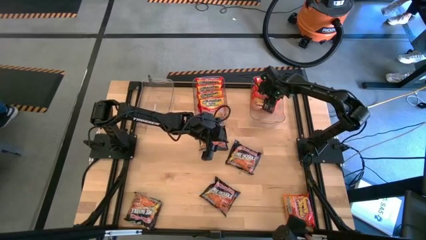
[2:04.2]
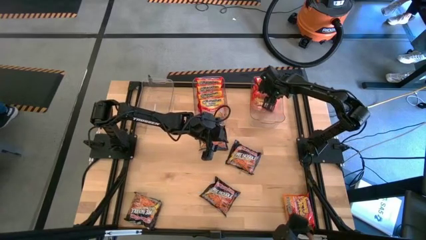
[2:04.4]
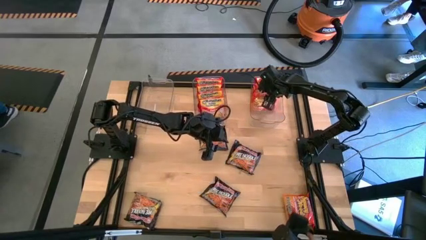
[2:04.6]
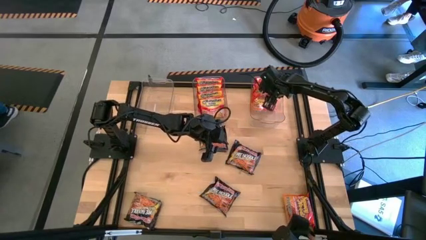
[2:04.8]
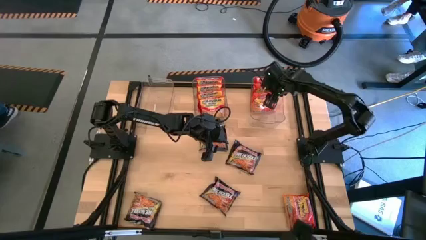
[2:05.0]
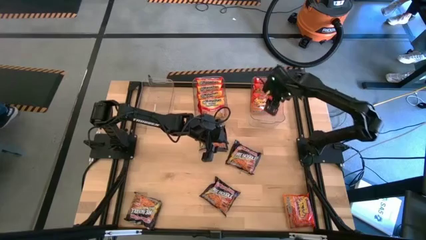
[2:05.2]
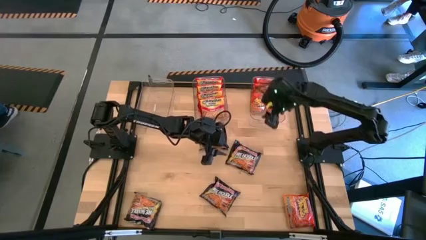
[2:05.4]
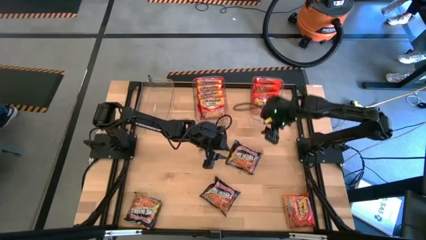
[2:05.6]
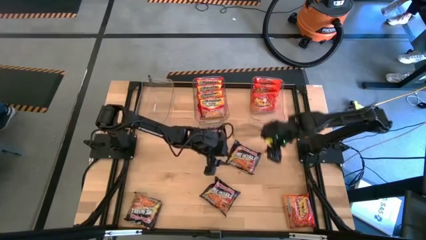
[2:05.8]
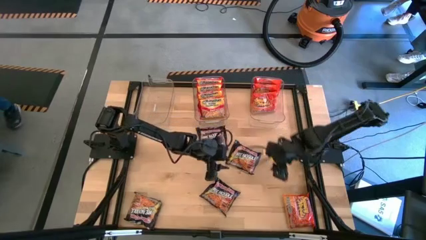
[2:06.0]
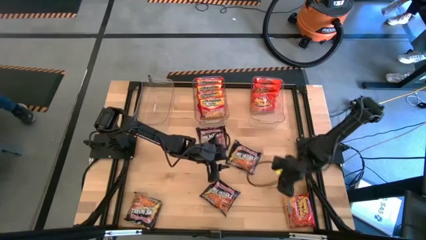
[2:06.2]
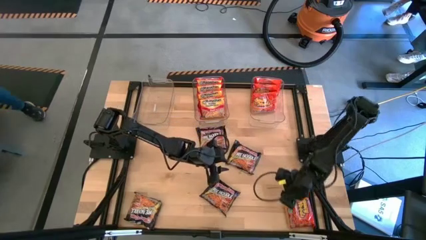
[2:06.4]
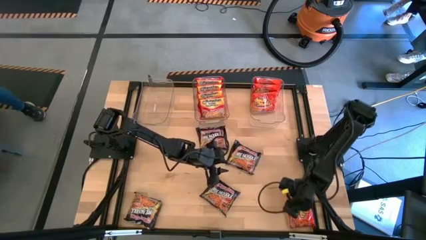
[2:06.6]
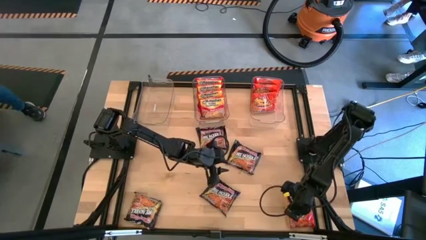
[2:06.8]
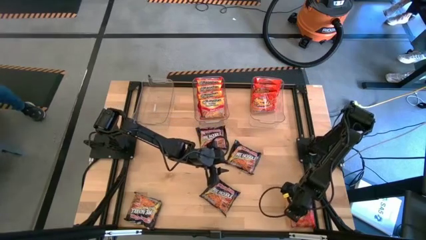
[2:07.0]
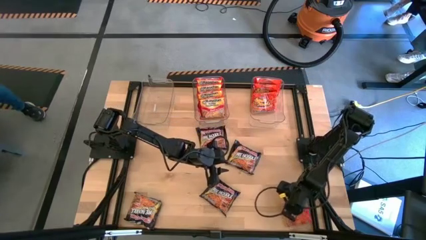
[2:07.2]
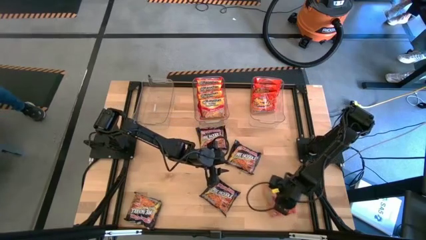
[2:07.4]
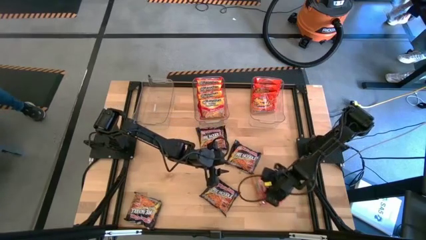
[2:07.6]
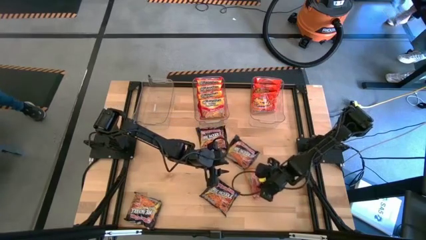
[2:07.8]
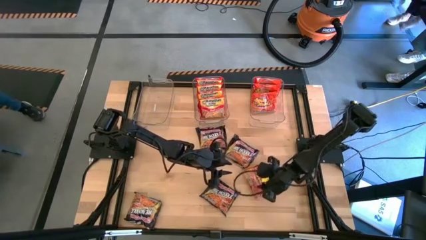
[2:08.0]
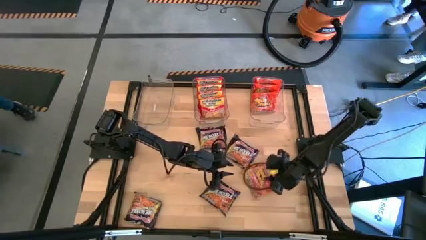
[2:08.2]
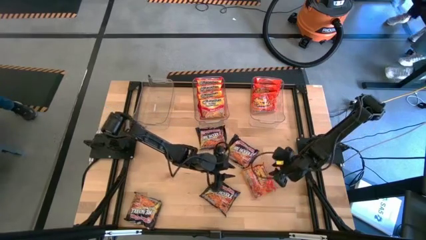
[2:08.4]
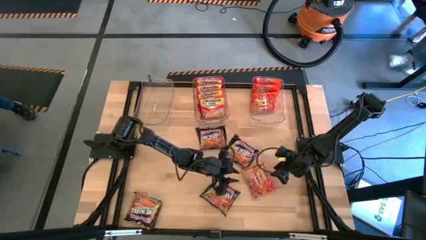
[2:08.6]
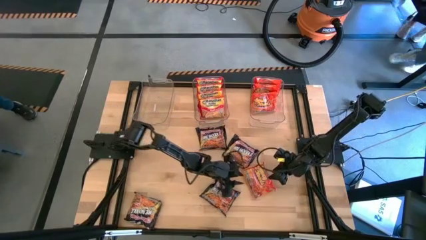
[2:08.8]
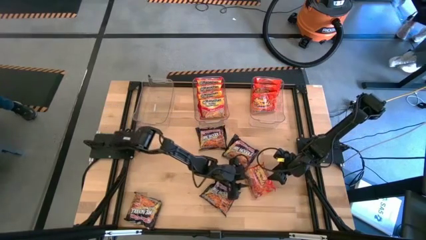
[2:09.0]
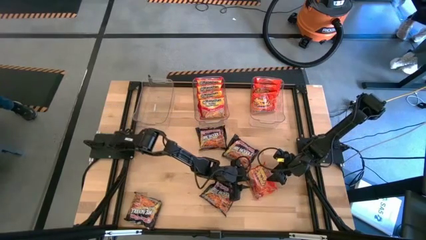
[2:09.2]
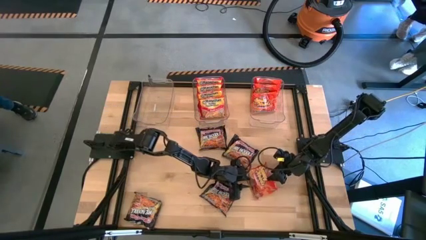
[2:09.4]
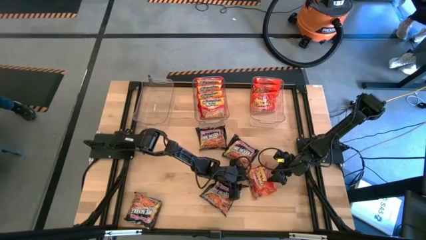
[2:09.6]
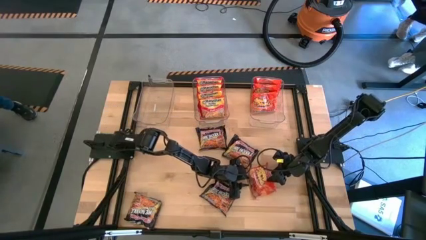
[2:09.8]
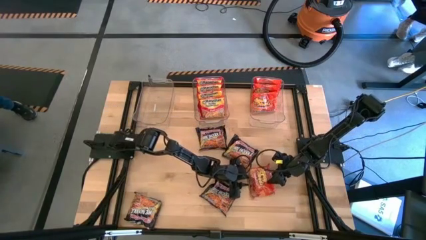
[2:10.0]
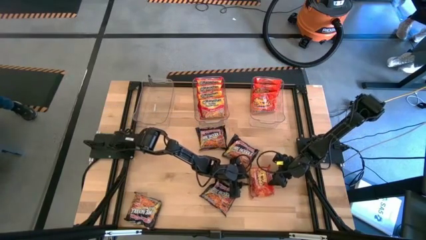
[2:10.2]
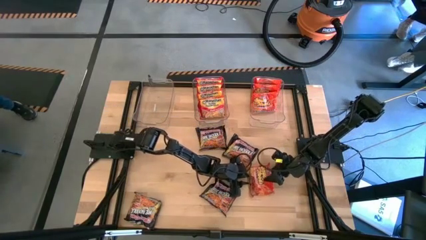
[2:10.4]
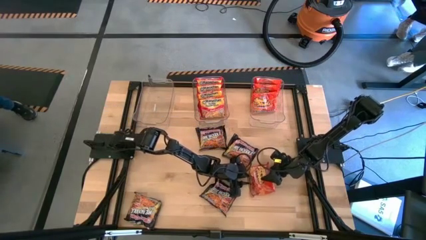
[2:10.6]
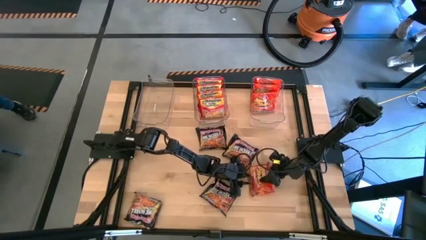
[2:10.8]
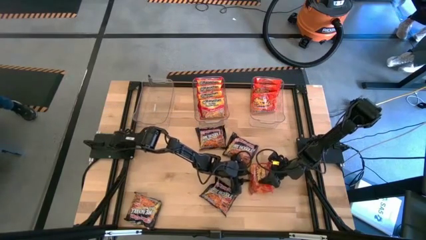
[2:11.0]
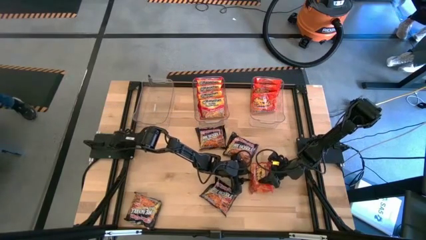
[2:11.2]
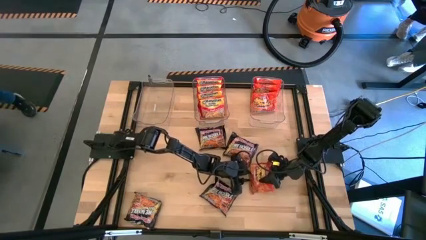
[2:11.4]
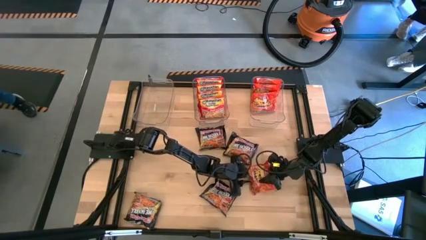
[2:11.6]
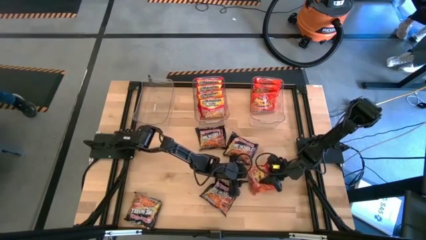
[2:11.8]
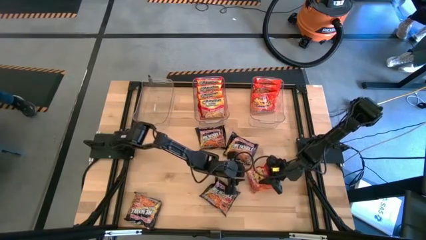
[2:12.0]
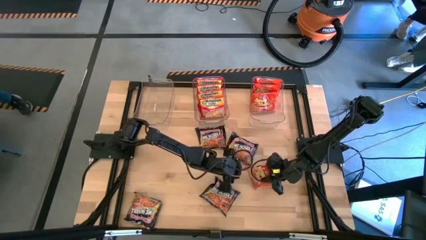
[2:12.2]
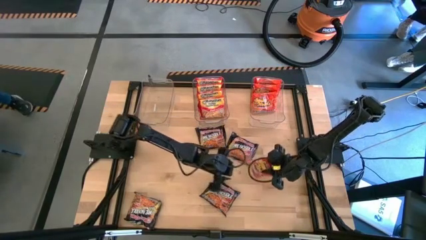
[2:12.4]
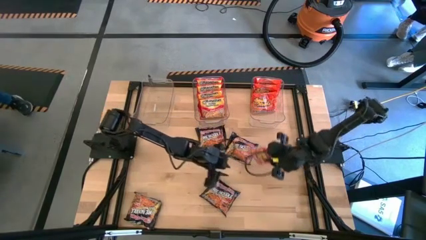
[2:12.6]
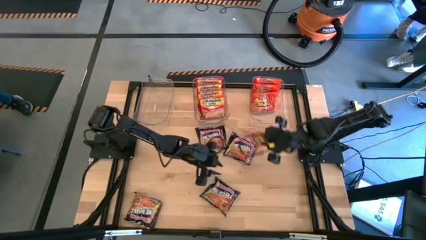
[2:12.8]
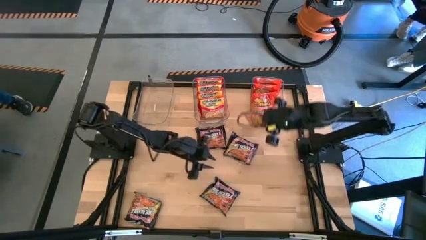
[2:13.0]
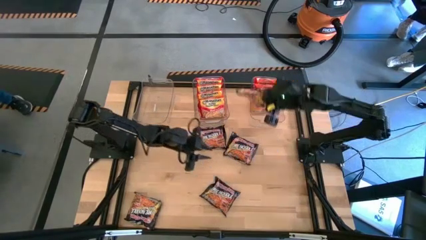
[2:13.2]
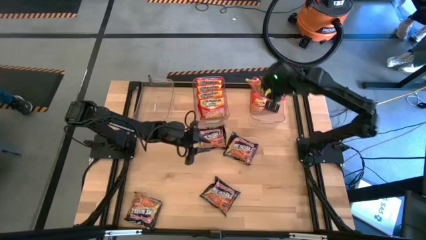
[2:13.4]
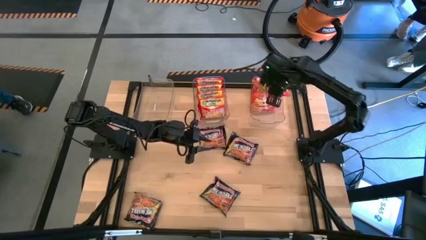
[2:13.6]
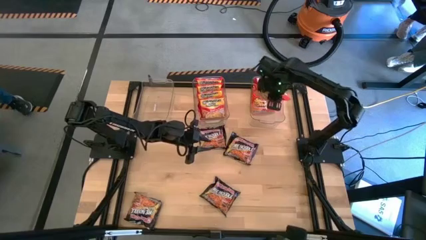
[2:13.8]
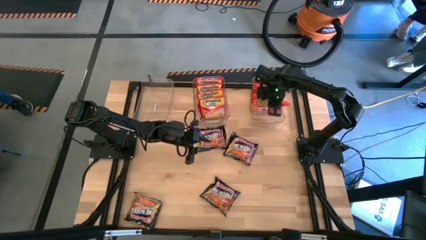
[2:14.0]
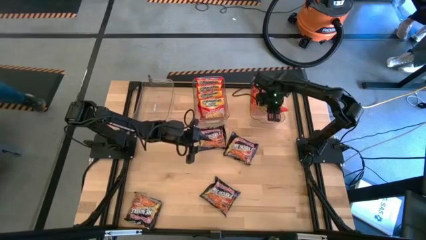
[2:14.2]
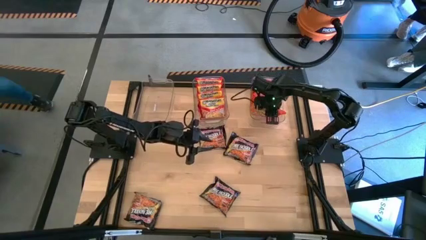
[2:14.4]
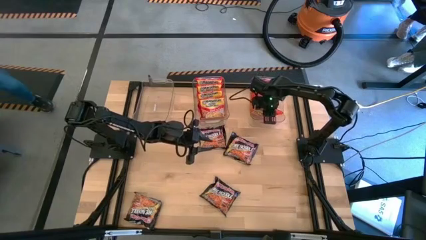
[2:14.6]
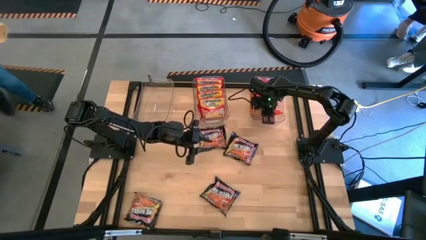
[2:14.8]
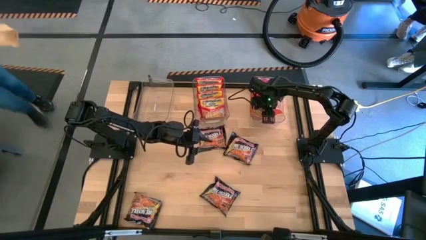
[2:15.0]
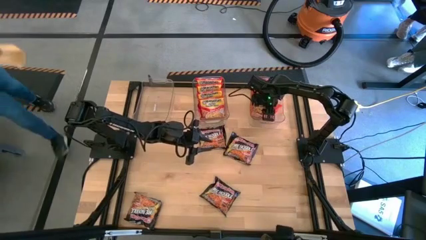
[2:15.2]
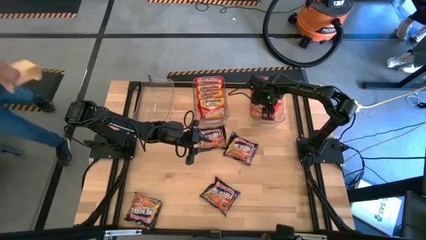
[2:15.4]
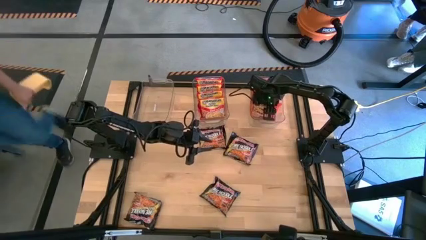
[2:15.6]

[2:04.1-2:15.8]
Task: Sort Maruchan noodles
Put the orange noodle pack into the right transparent bin
